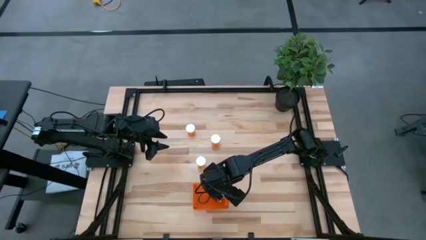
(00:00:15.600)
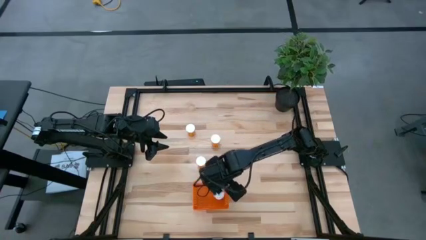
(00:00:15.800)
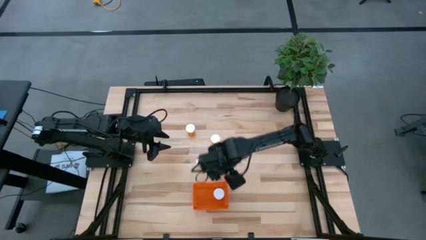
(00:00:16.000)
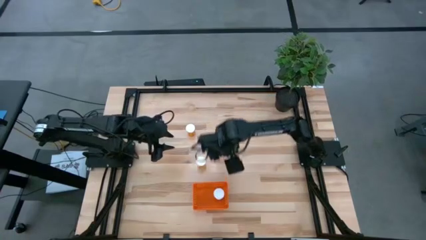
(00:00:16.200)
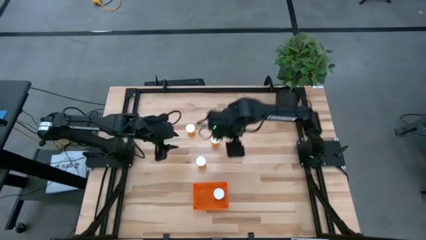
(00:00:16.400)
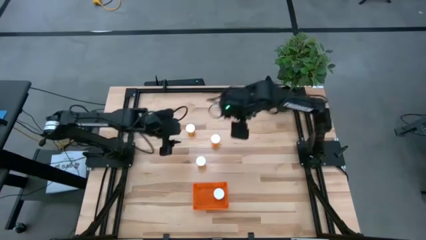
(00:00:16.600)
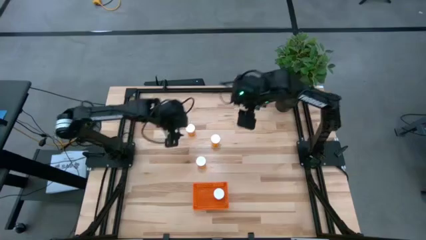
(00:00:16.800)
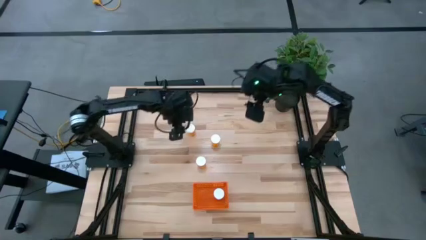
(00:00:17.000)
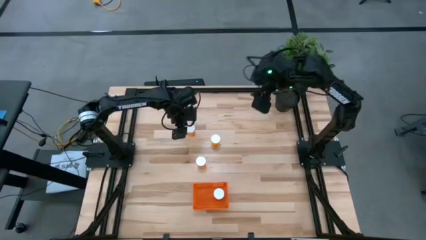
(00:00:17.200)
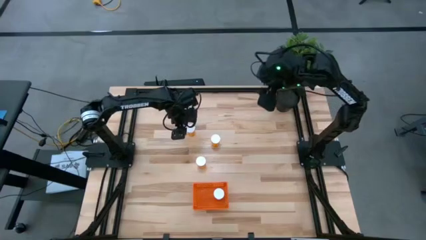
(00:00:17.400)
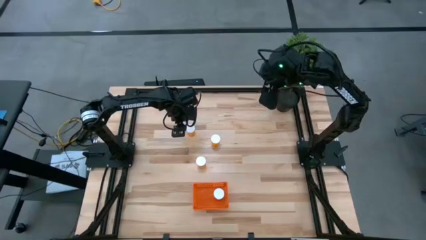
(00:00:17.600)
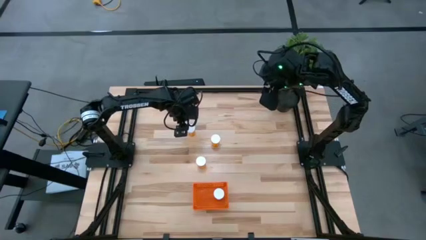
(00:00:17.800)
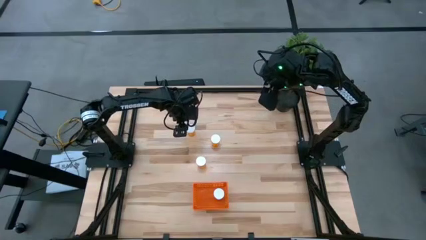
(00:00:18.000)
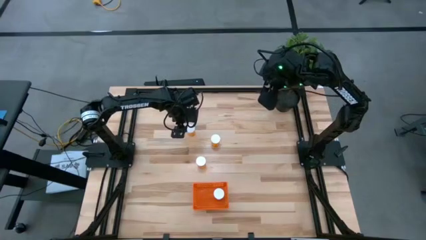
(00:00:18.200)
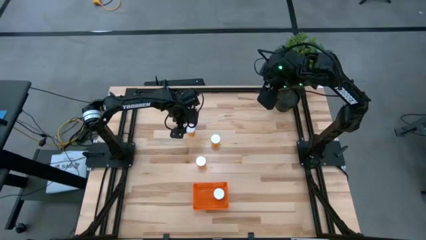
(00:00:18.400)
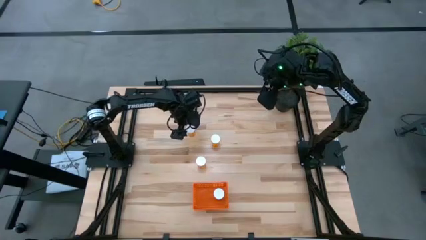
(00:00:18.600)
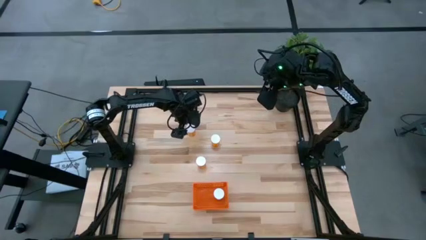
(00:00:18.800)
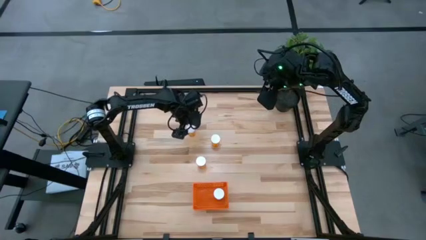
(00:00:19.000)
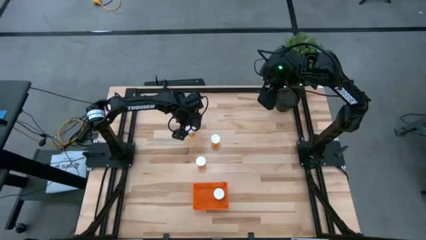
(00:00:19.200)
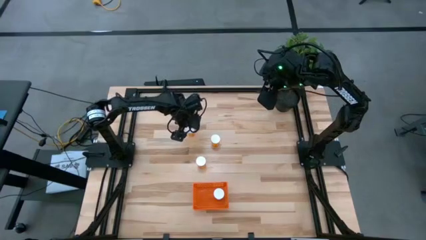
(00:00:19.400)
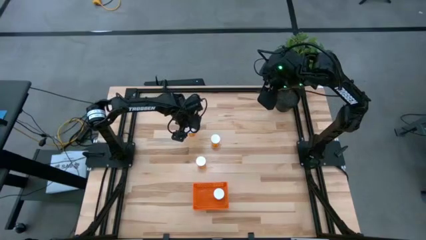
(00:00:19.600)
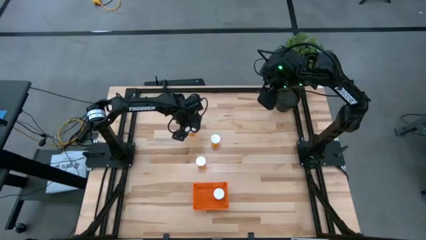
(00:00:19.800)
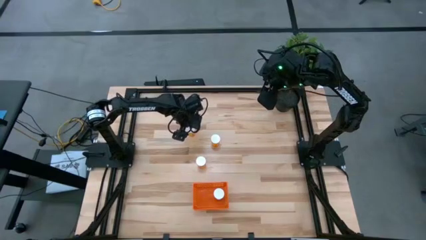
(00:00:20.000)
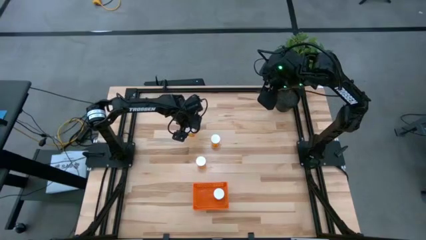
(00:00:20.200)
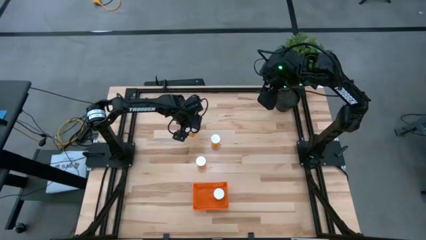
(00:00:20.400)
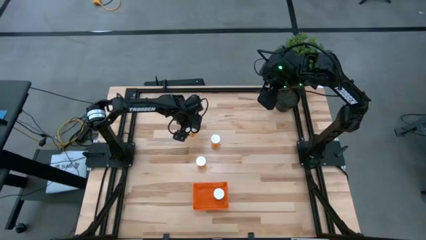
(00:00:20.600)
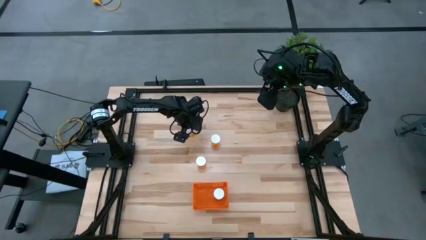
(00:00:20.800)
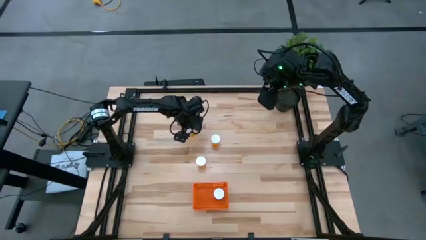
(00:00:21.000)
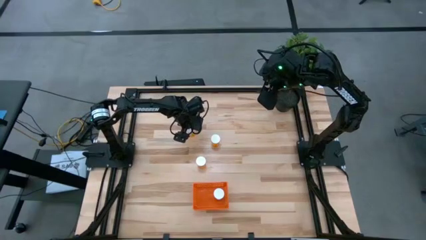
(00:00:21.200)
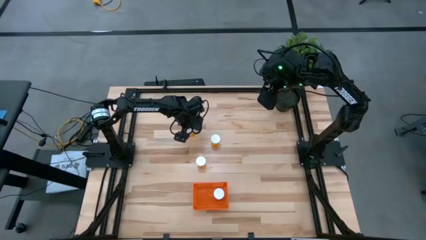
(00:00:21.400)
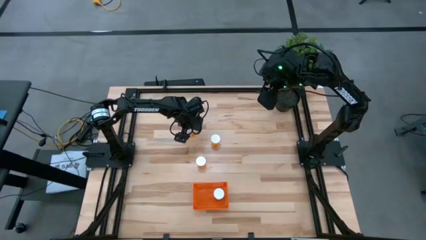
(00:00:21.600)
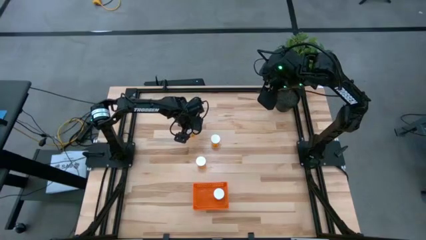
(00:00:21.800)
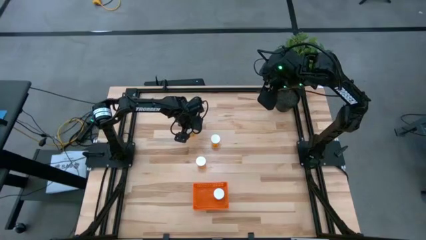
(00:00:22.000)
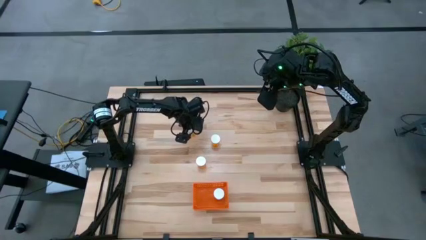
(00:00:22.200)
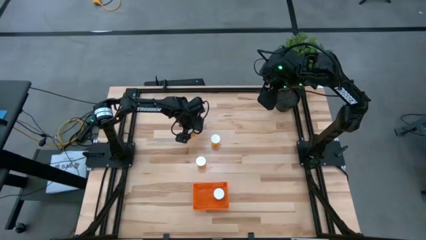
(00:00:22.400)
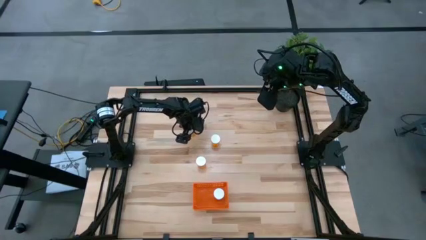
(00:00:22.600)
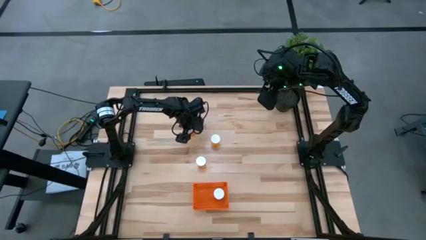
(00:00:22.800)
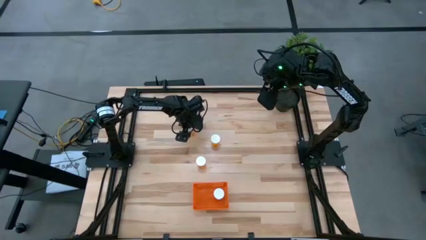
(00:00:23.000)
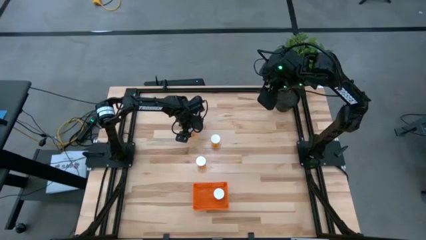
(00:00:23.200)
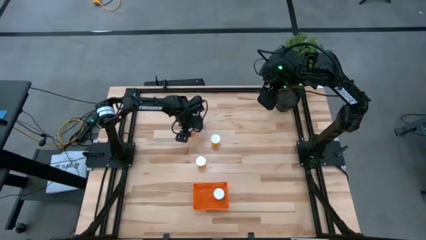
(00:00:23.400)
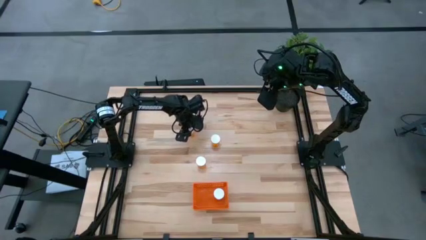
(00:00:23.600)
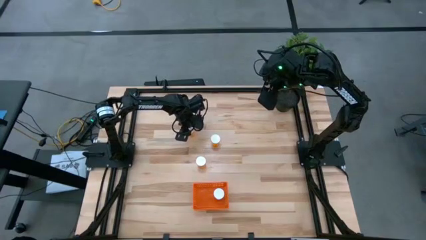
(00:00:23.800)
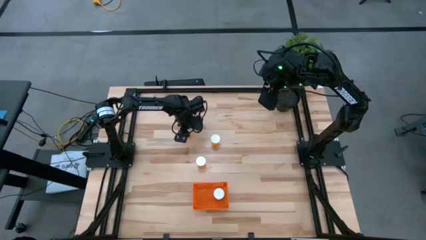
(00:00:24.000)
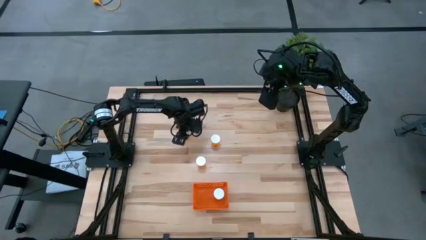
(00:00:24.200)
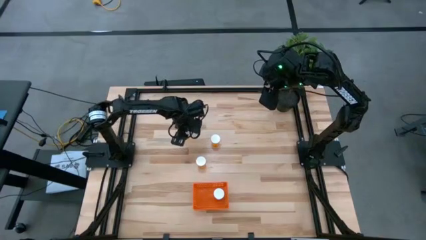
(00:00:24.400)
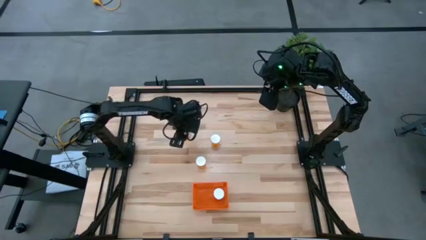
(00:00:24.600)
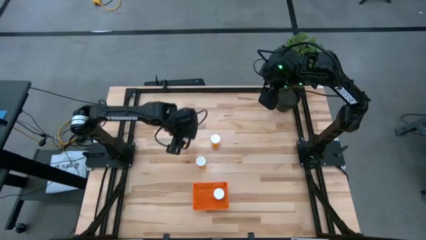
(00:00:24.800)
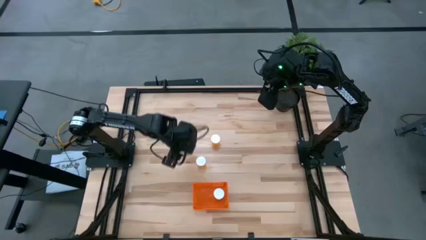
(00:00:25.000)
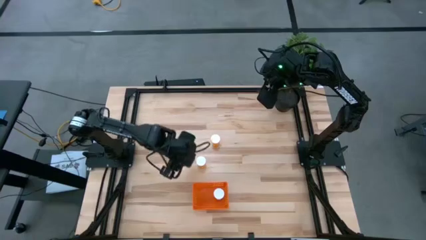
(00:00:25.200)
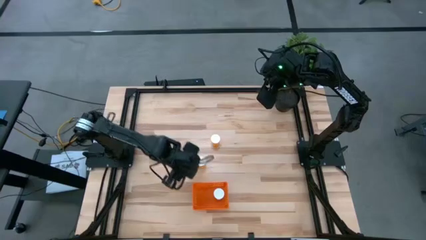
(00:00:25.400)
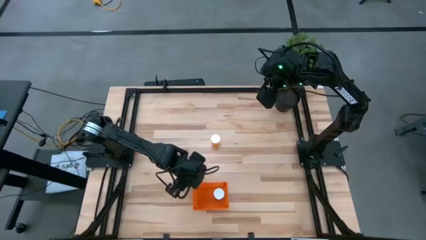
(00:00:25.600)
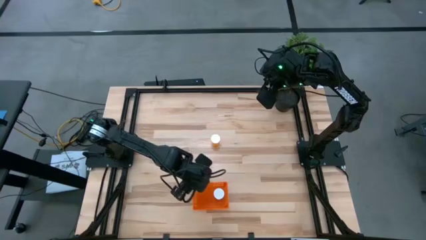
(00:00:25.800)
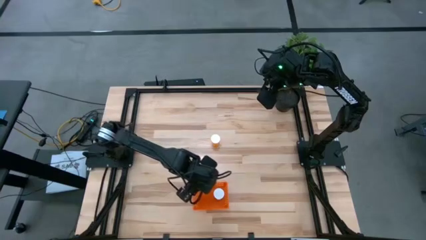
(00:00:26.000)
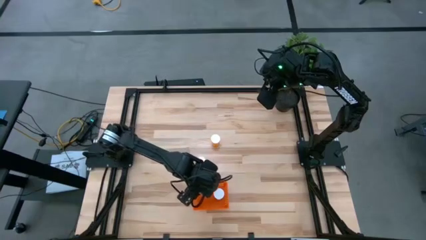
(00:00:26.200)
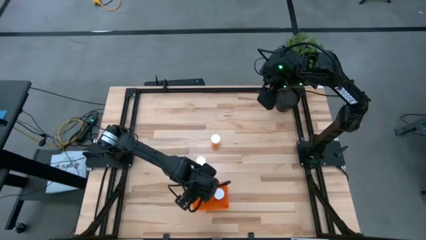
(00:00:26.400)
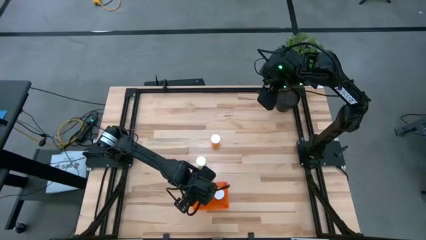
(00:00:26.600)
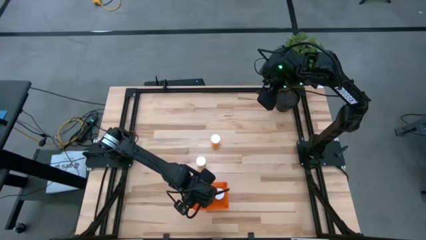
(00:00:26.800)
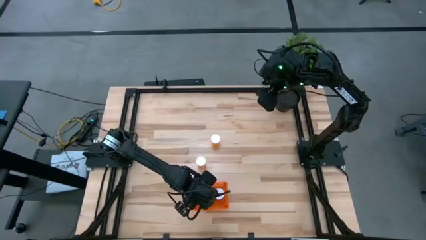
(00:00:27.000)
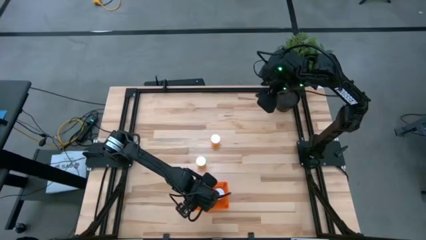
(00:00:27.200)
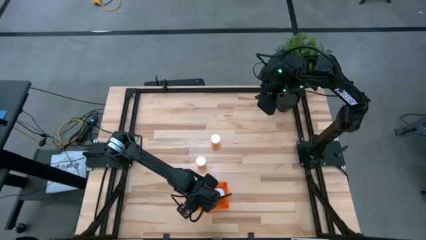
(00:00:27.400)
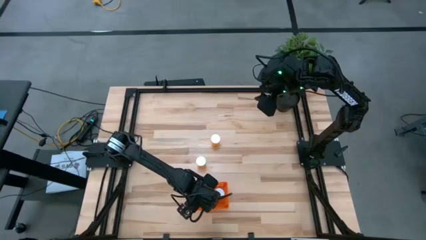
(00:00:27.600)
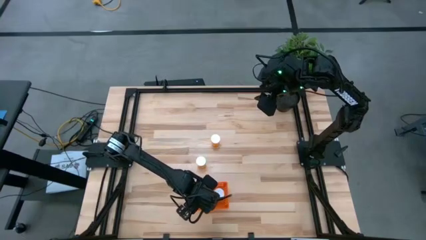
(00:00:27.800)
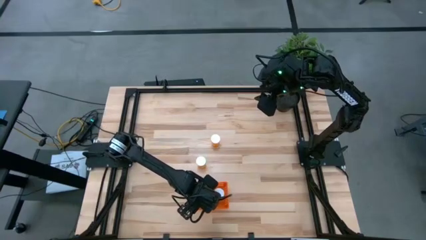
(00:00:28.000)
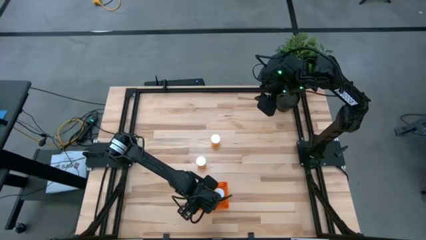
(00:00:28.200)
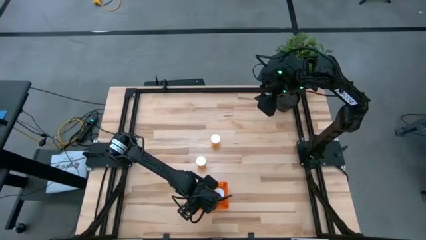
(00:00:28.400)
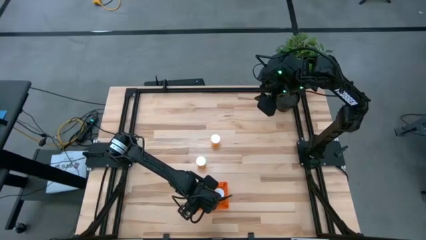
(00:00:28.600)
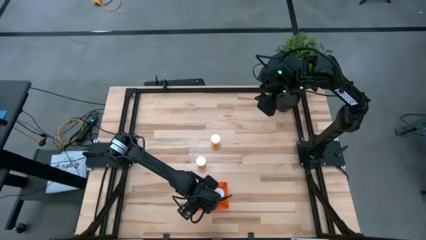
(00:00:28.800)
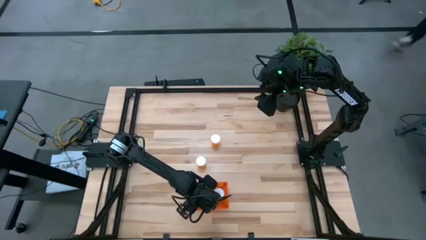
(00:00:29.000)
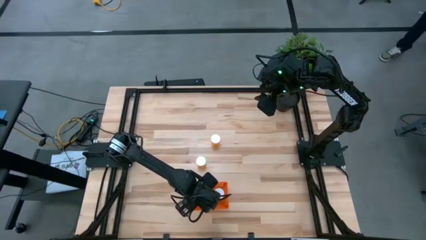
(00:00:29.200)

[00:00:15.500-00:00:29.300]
Task: Pick and place pill bottles into a basket
Put the orange pill bottle into the orange bin
